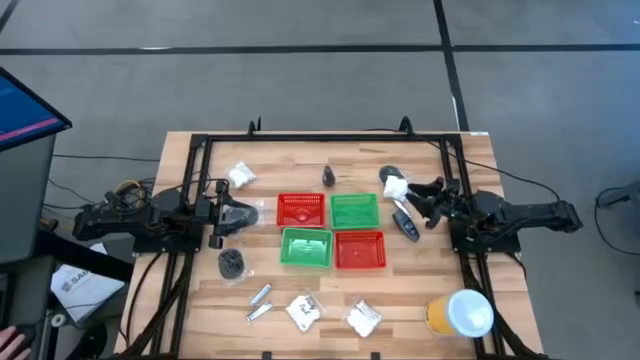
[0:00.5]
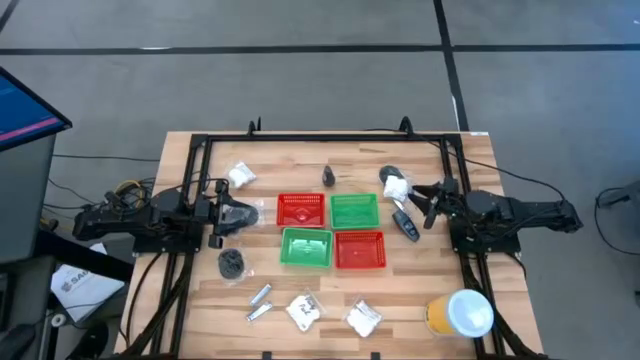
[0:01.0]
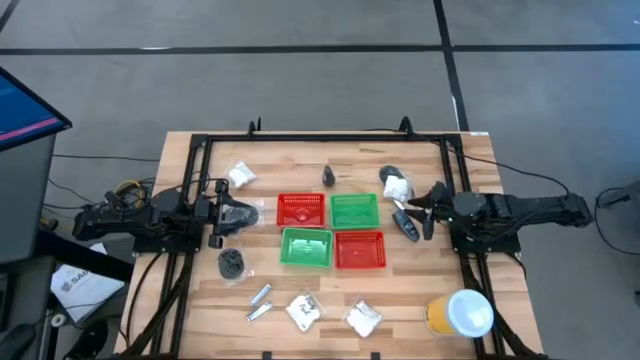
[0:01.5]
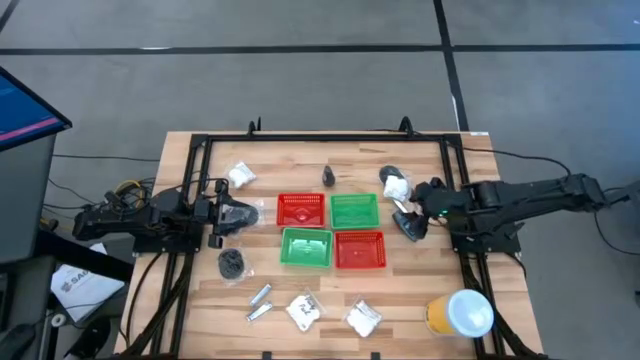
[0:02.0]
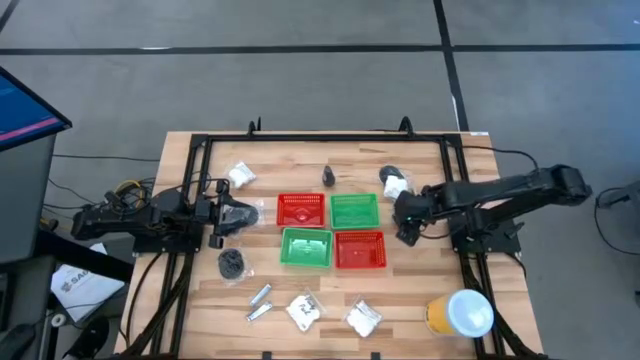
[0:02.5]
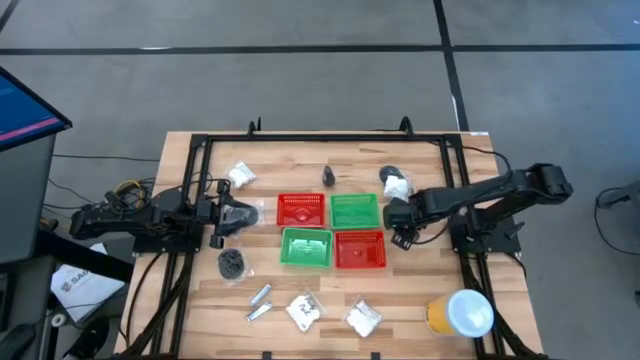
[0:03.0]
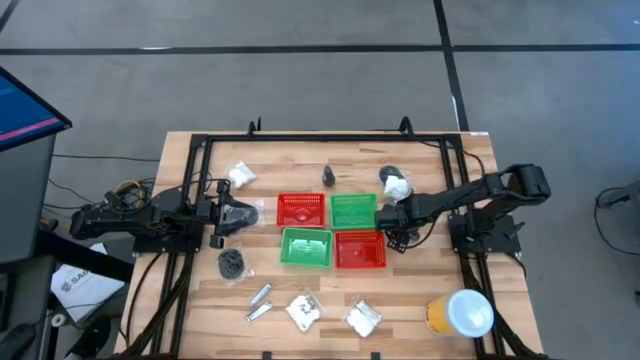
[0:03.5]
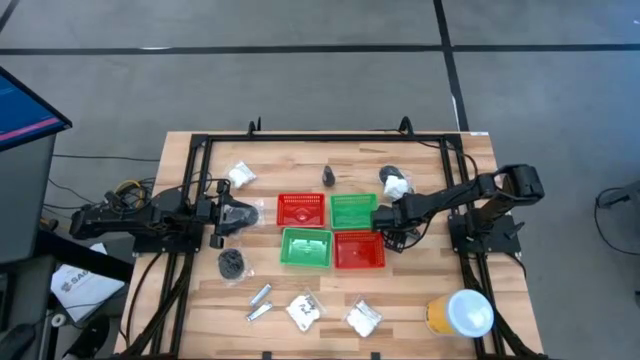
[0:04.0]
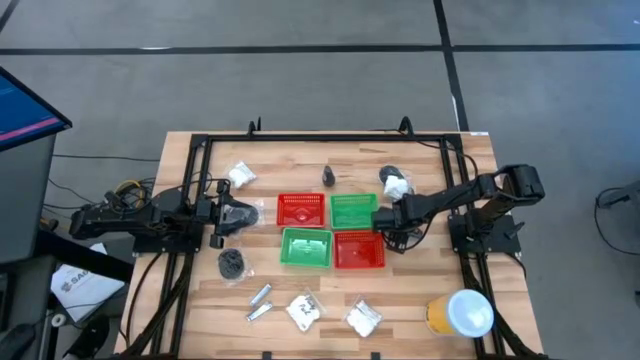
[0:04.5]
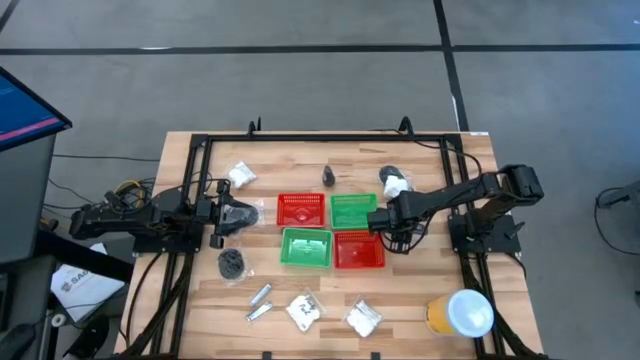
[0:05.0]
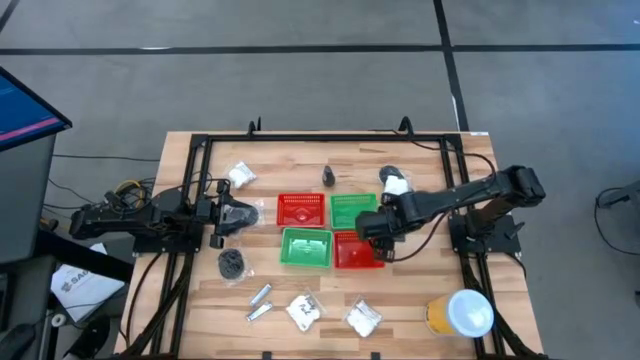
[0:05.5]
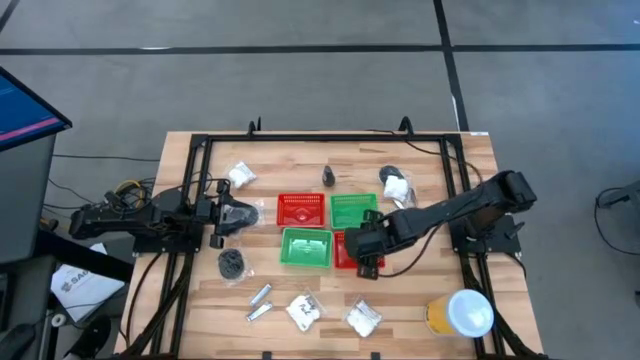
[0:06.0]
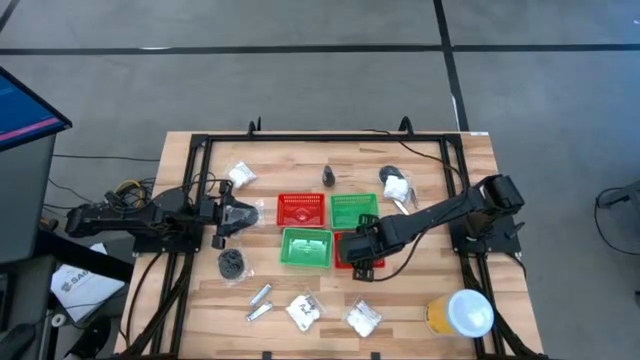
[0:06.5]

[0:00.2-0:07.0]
Task: Pick & Place Travel size toiletries
Put the black deodorant into the right red basket

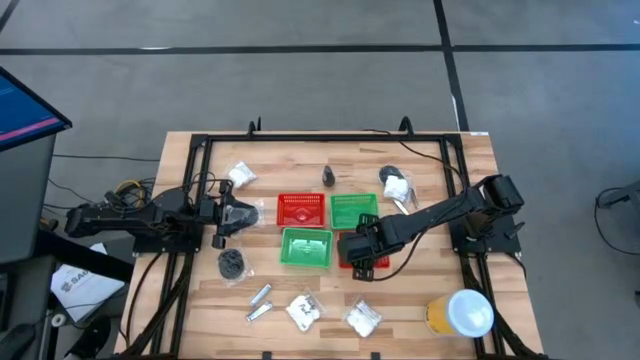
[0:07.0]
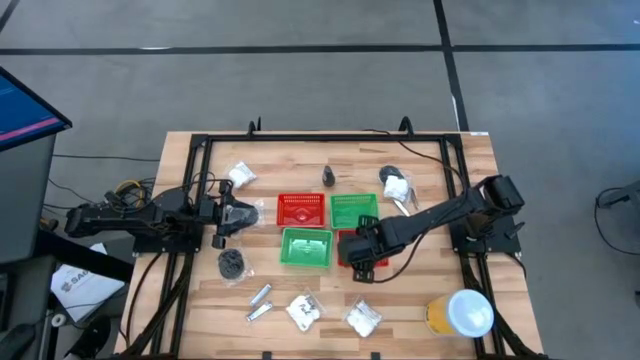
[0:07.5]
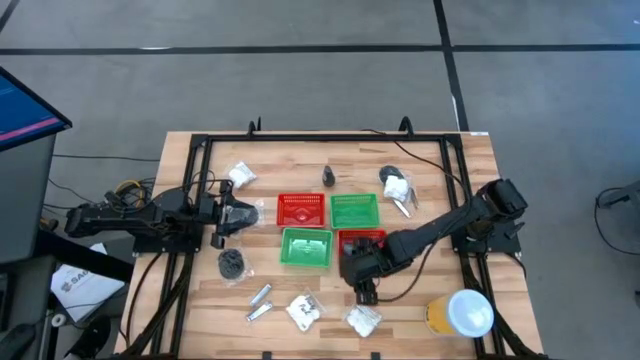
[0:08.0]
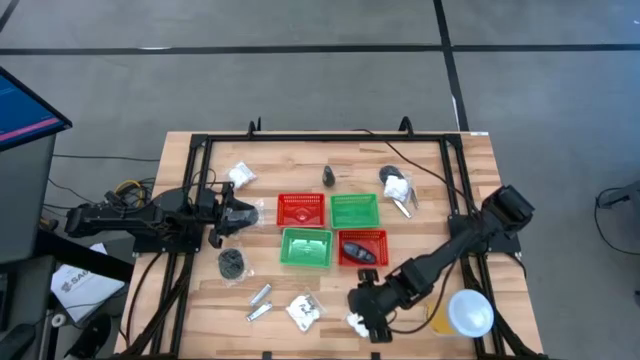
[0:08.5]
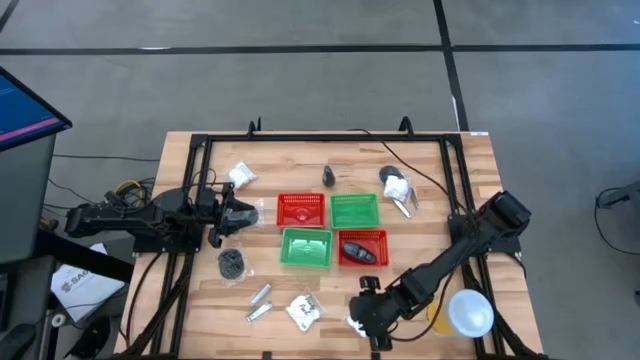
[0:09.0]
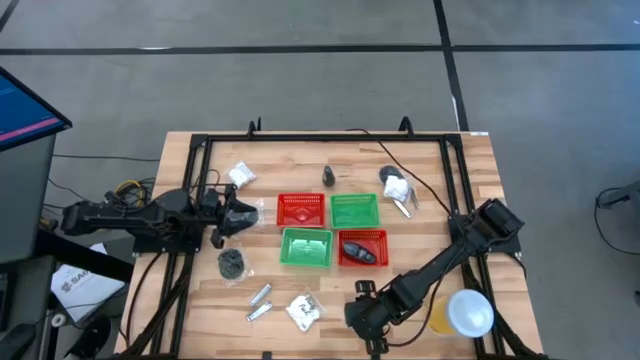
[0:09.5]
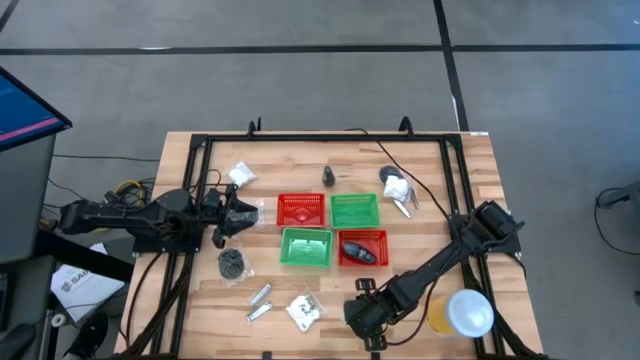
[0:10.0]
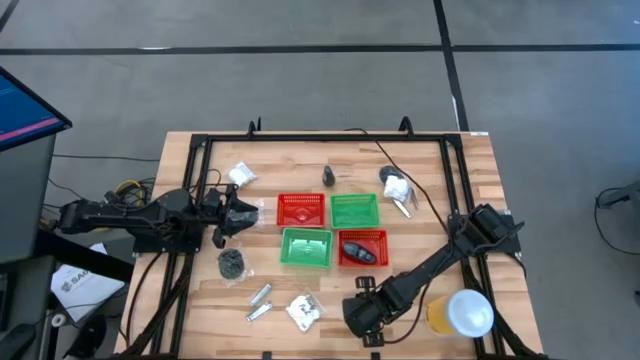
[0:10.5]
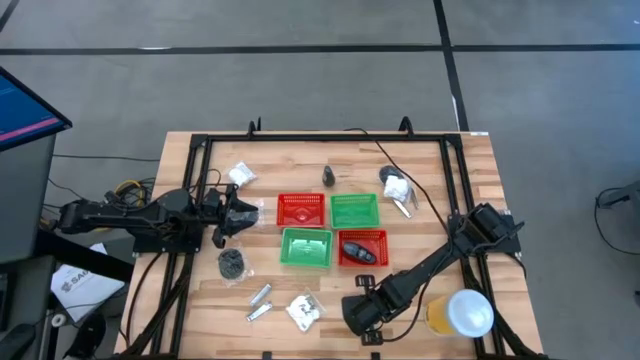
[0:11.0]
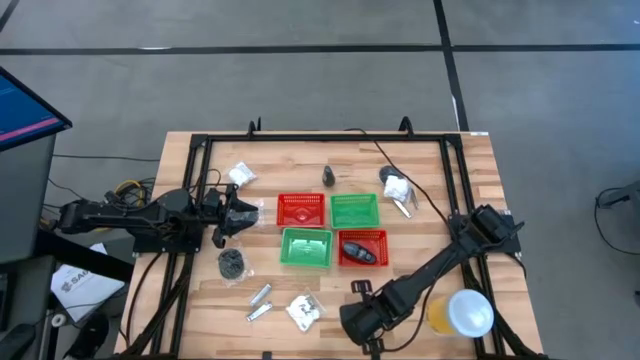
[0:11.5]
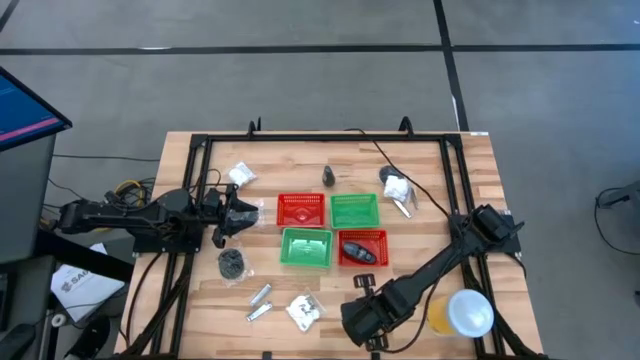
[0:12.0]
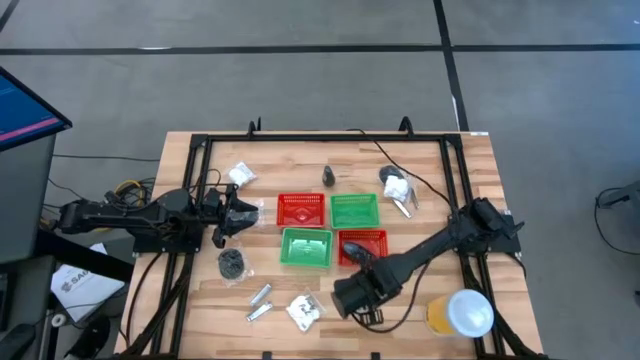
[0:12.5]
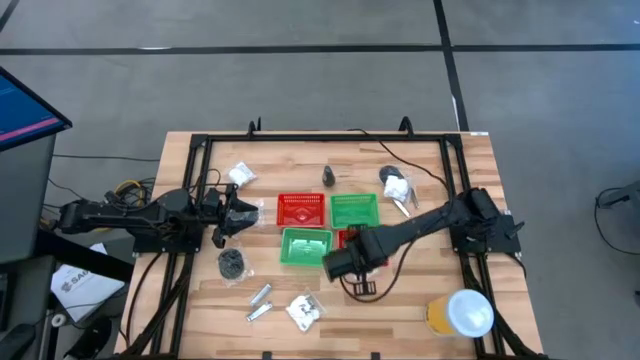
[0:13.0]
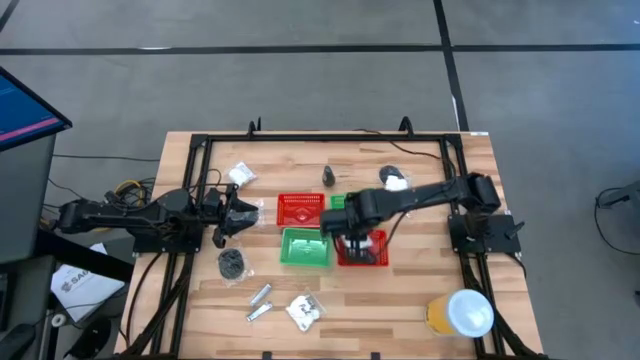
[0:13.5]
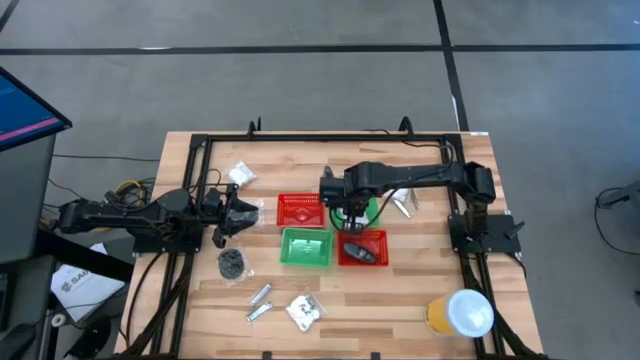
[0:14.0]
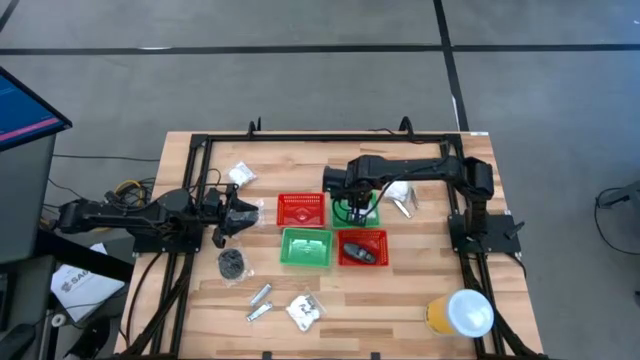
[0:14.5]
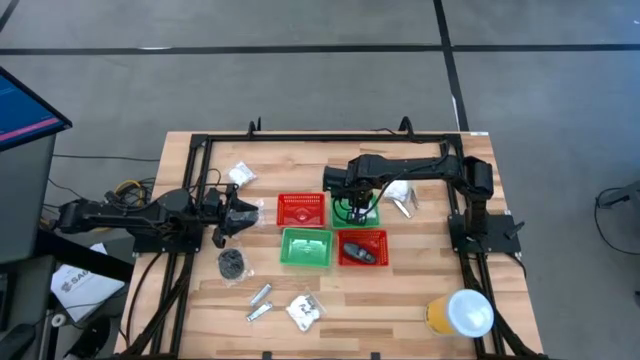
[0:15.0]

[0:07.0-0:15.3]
Put the white cotton pack into the right green basket

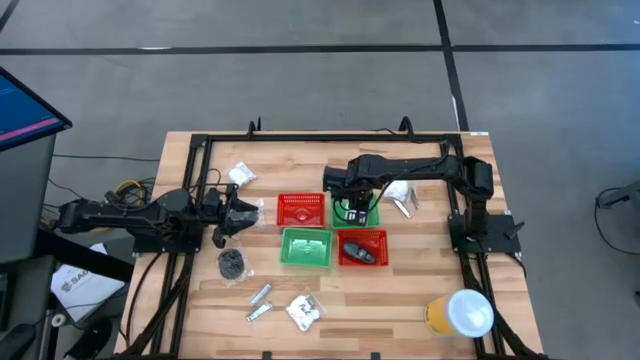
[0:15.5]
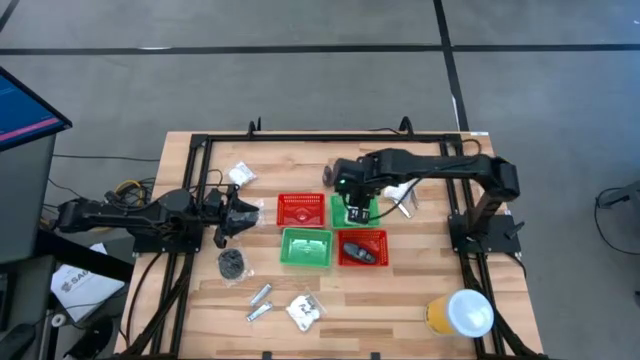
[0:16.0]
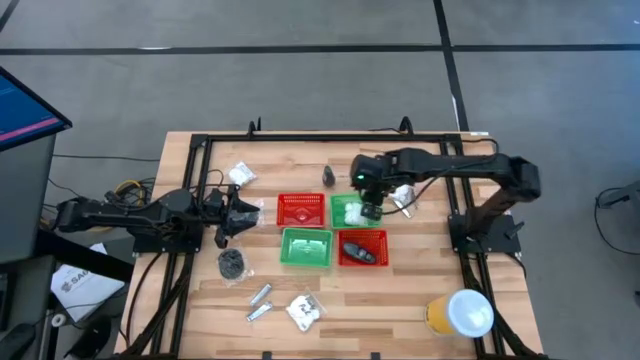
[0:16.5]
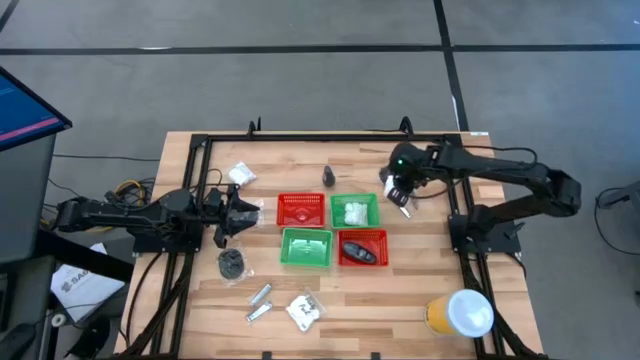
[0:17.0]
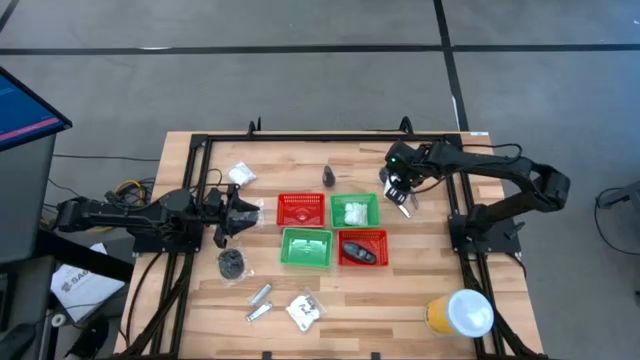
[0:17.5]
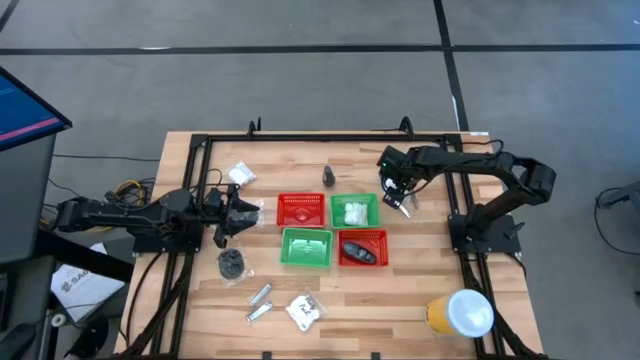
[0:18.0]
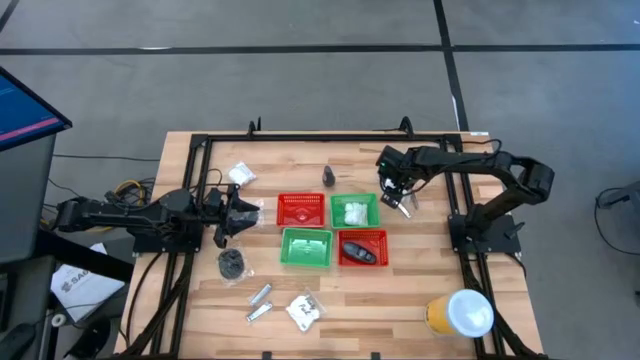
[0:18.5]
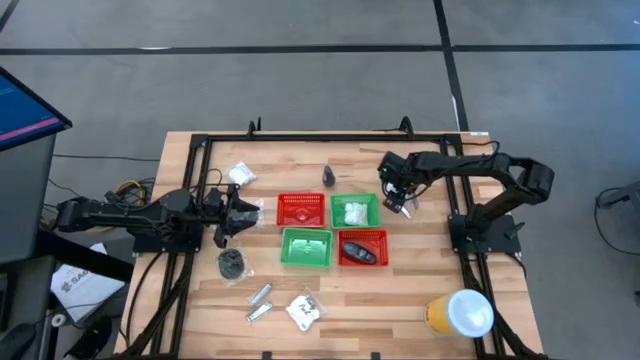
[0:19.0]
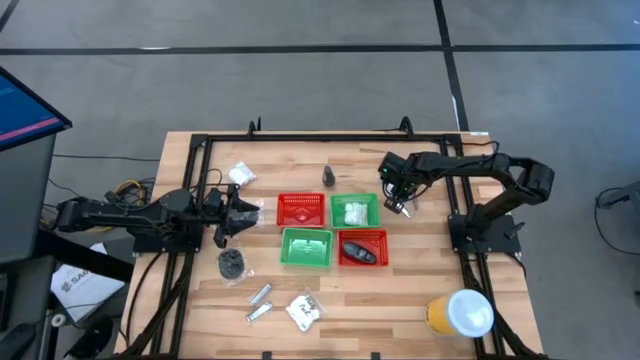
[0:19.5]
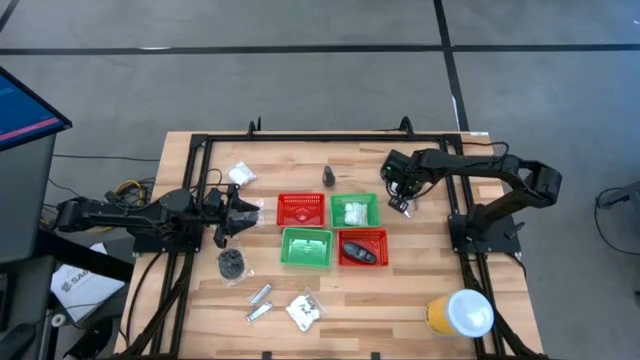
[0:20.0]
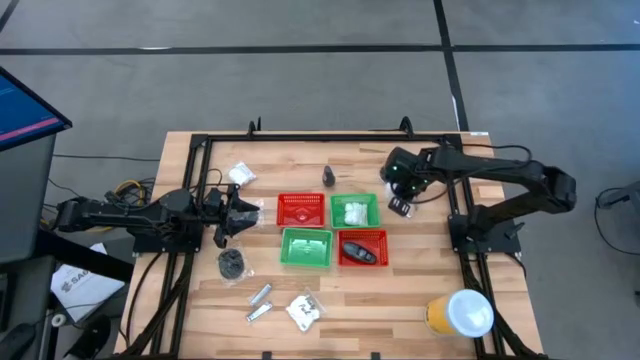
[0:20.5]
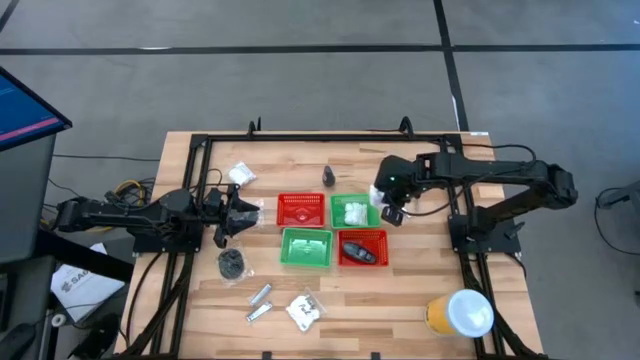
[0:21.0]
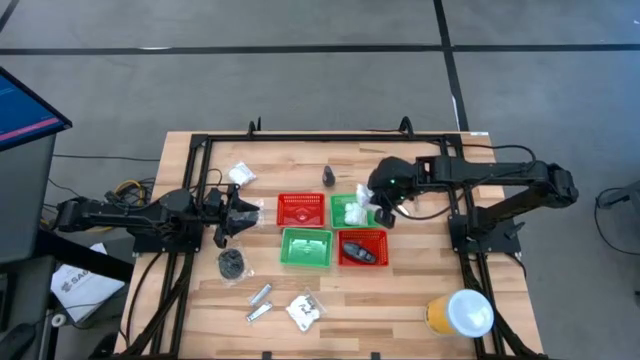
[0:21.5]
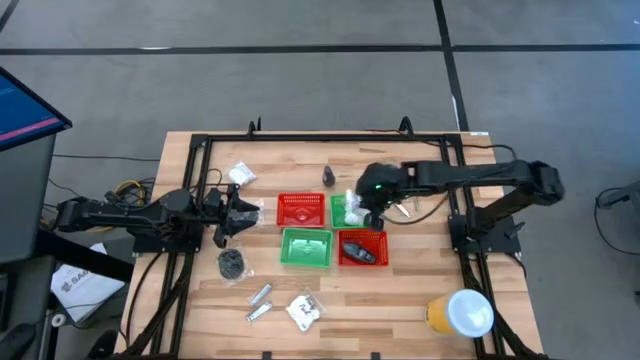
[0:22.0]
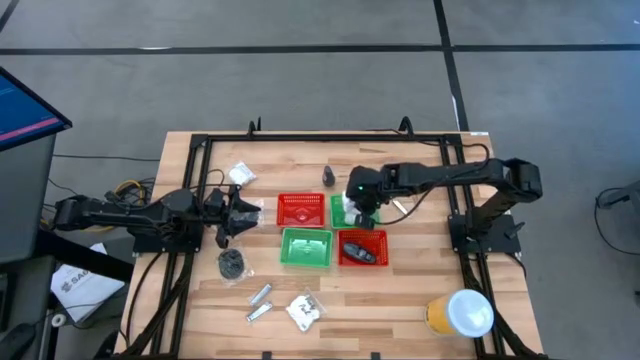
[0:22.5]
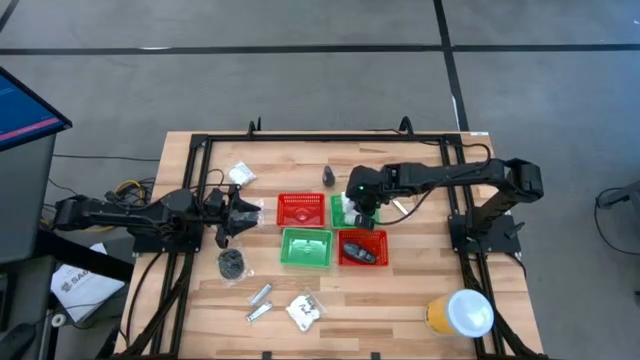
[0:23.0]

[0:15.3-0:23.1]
Put the white cotton pack into the right green basket
